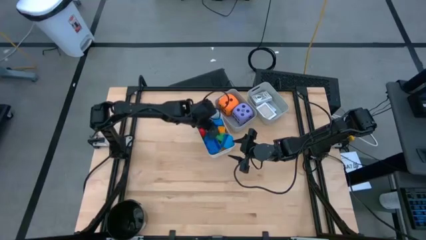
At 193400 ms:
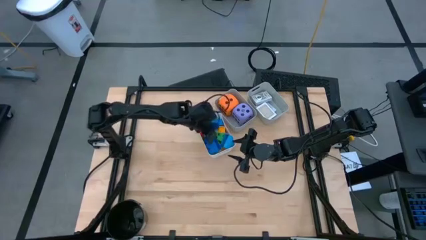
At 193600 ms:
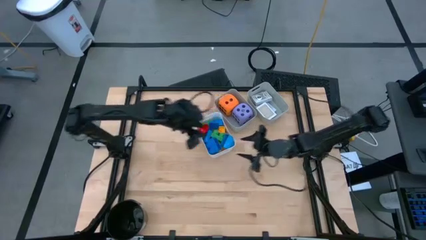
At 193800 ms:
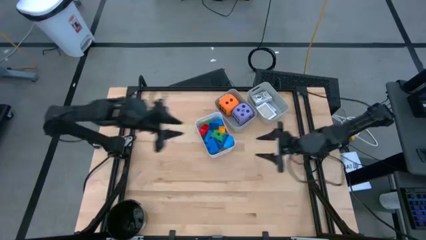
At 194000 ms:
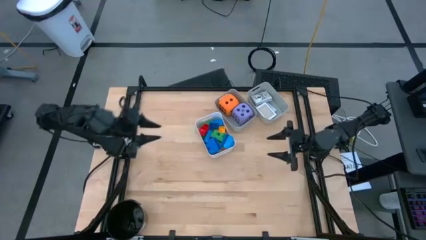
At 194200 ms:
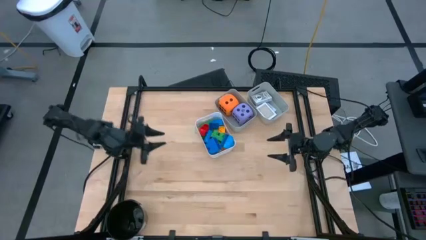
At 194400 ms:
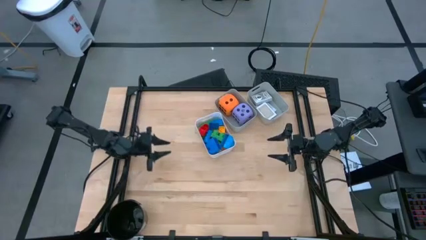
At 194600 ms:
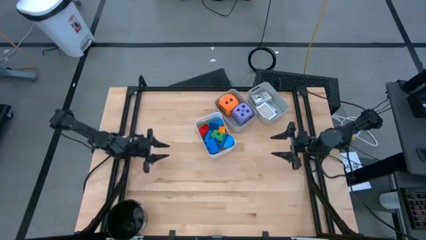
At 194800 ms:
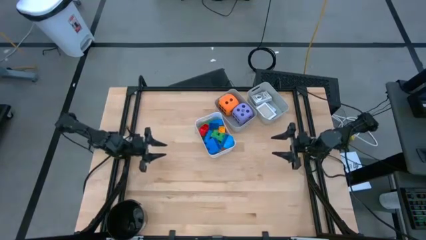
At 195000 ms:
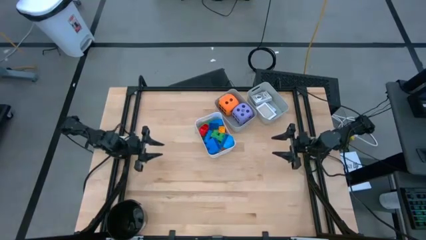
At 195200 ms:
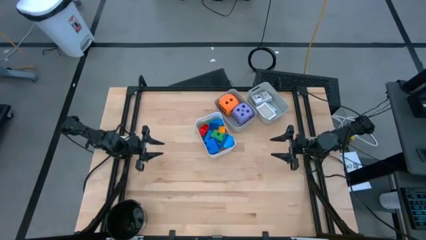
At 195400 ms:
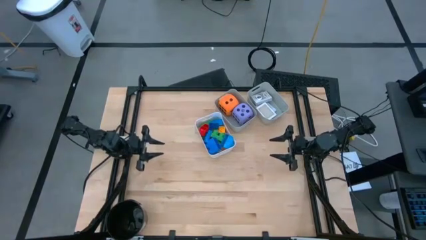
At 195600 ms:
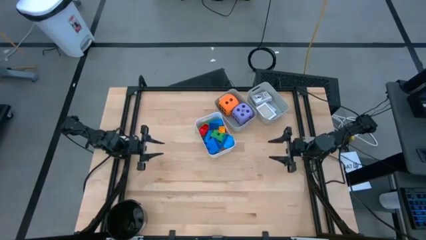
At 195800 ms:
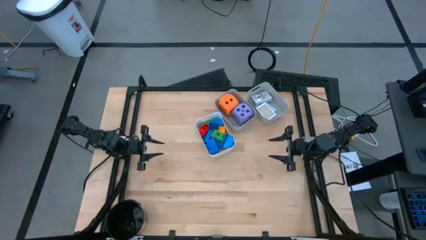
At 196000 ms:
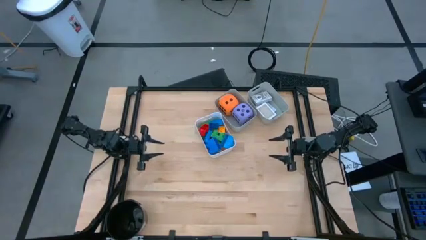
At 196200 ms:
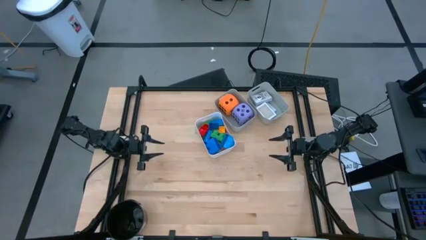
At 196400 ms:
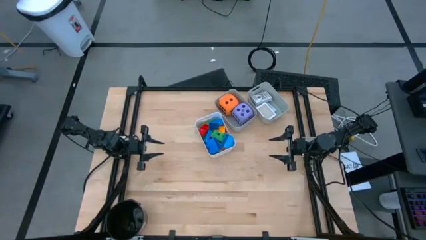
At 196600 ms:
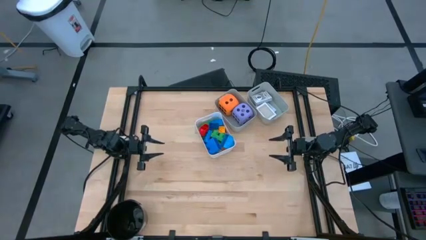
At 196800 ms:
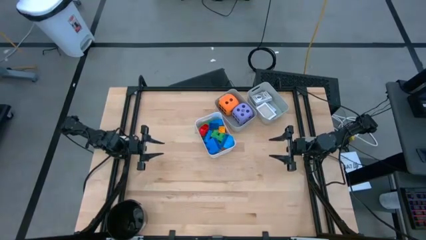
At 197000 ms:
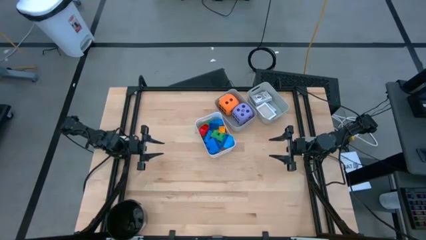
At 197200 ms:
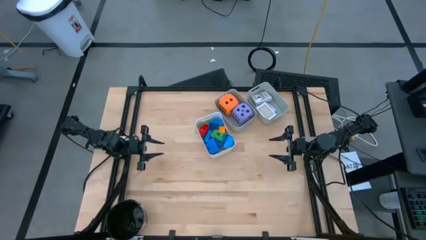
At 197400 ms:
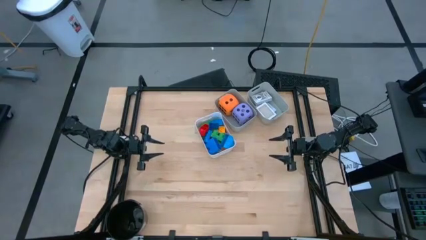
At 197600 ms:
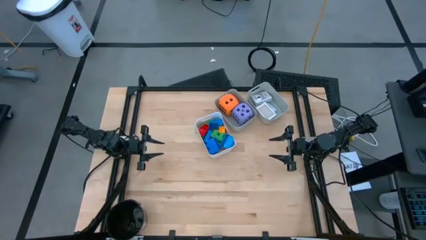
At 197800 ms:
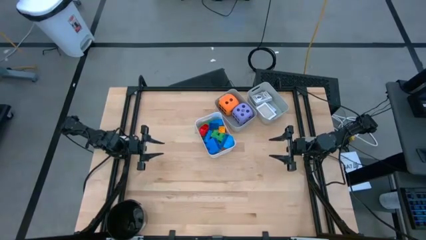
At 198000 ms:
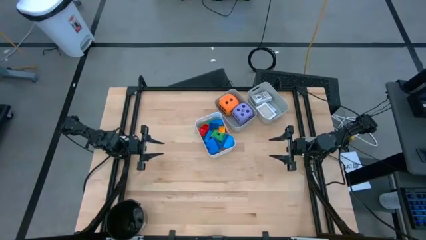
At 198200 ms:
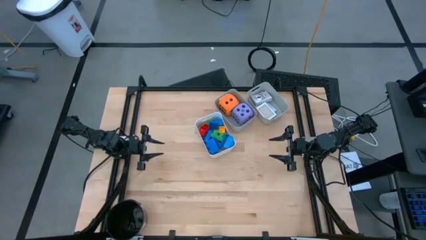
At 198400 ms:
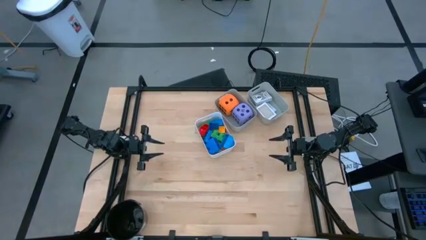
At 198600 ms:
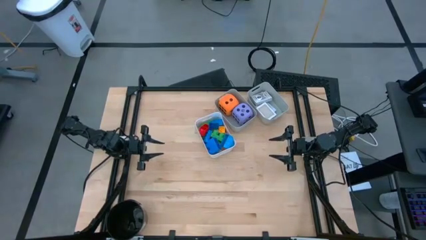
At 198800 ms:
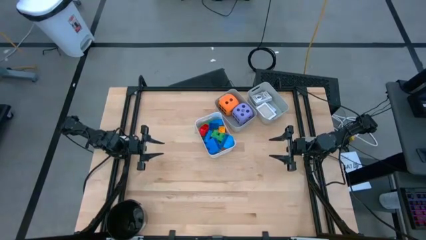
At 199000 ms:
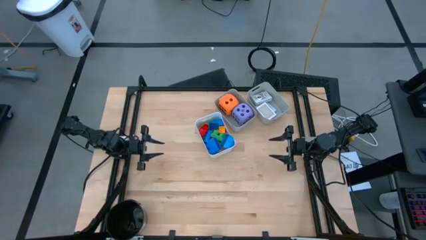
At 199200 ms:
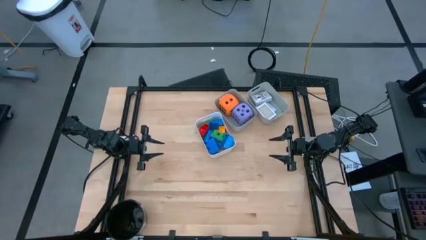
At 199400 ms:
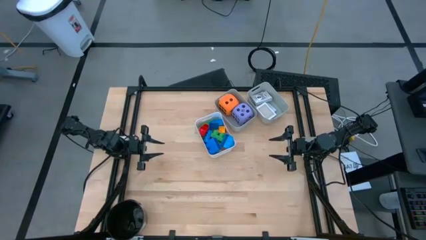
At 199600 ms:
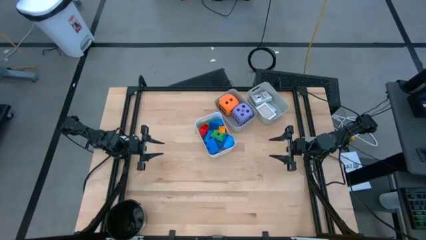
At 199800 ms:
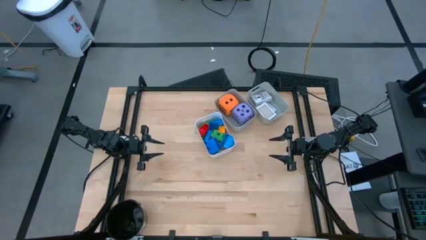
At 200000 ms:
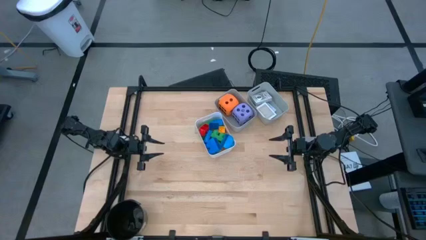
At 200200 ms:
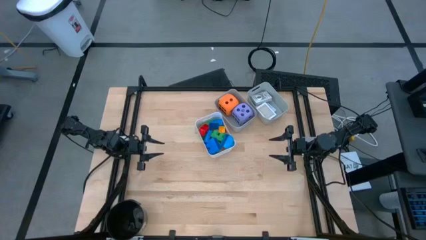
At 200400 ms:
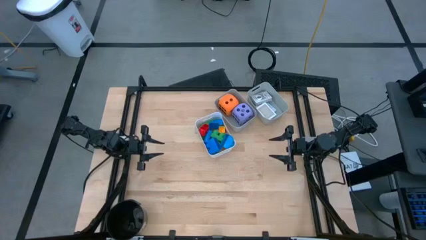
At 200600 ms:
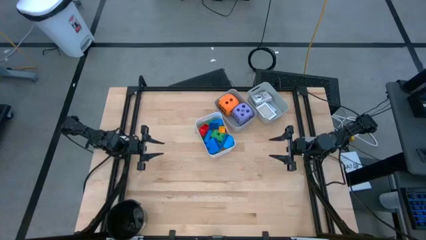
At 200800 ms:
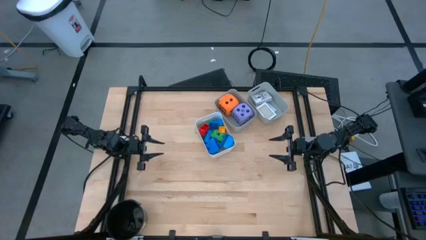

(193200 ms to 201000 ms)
Task: Pick & Place Toys
Return to Home Position

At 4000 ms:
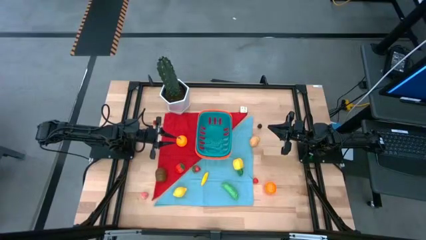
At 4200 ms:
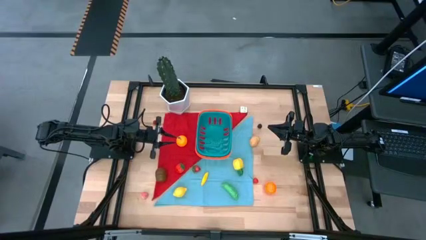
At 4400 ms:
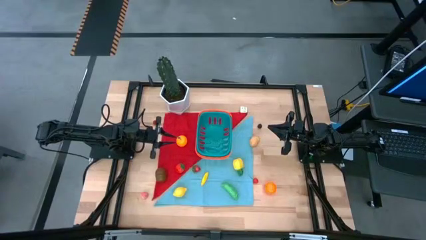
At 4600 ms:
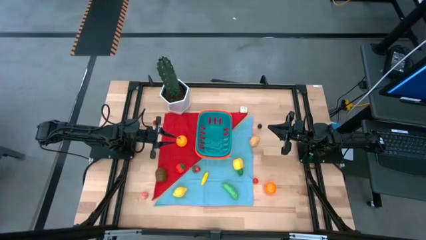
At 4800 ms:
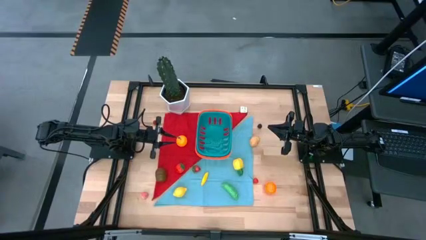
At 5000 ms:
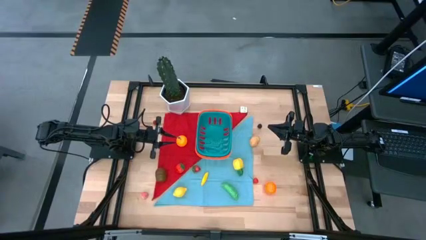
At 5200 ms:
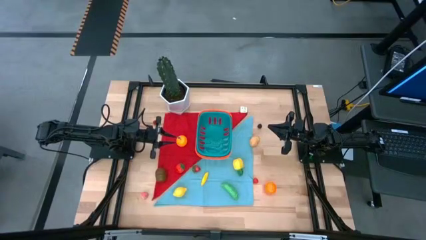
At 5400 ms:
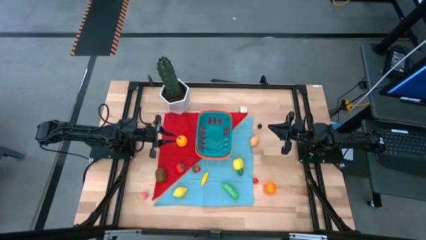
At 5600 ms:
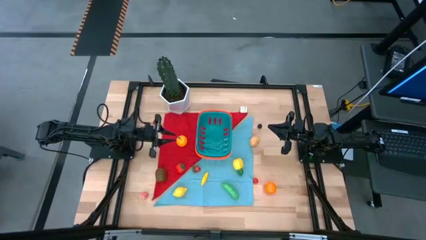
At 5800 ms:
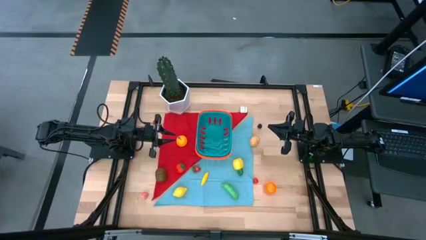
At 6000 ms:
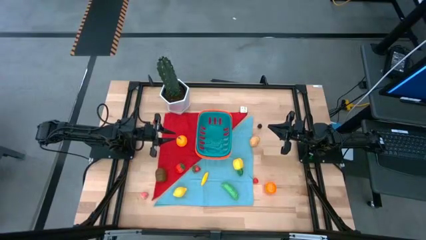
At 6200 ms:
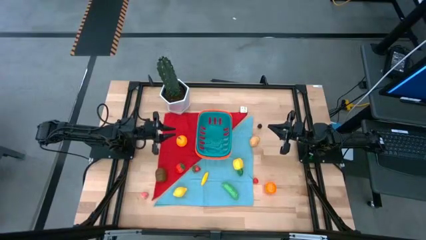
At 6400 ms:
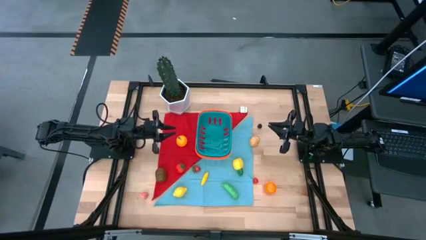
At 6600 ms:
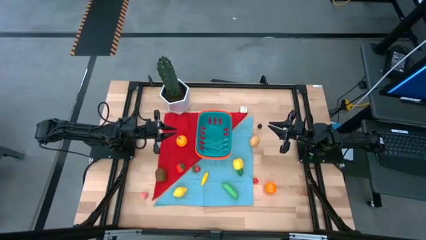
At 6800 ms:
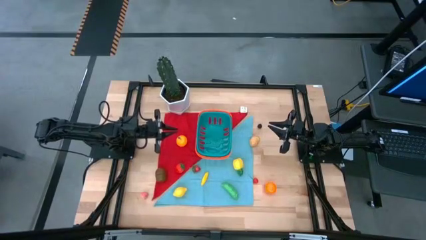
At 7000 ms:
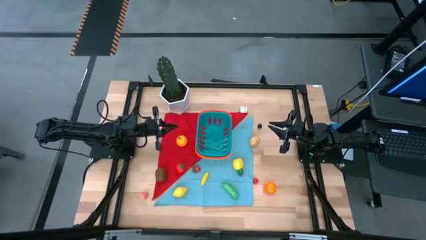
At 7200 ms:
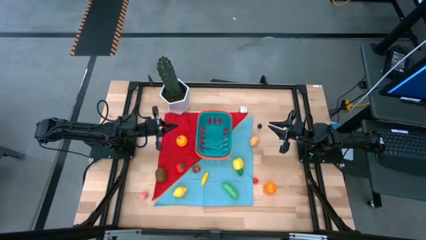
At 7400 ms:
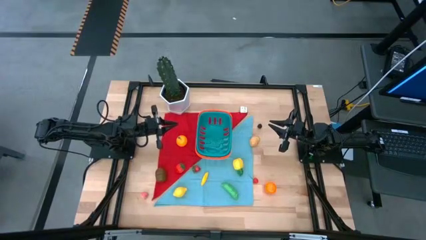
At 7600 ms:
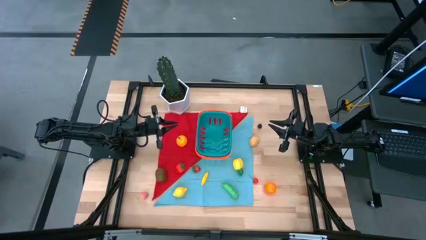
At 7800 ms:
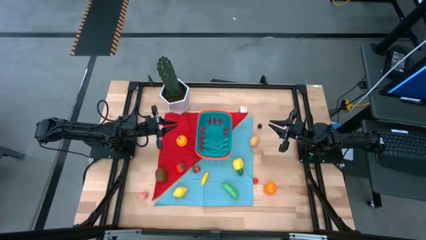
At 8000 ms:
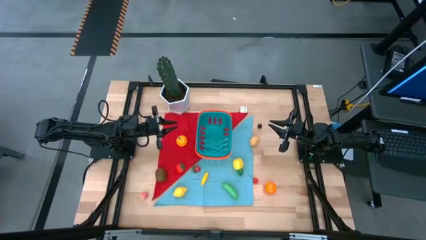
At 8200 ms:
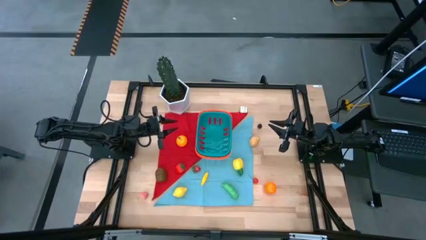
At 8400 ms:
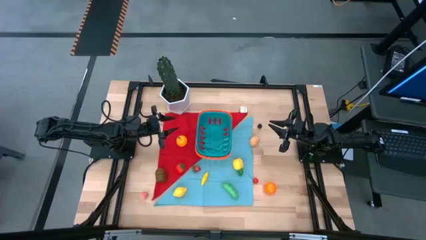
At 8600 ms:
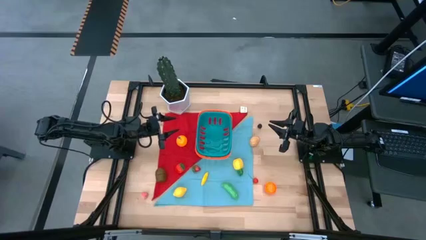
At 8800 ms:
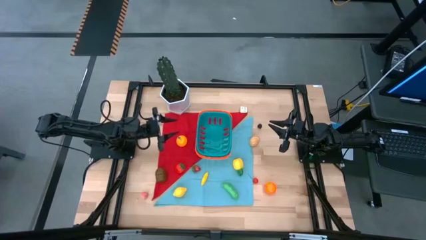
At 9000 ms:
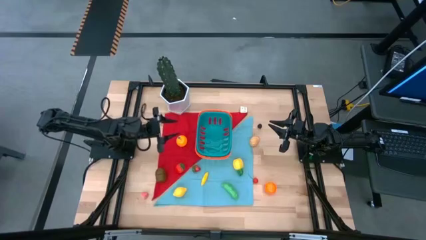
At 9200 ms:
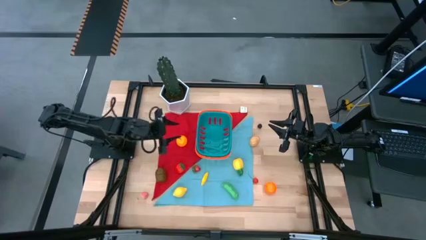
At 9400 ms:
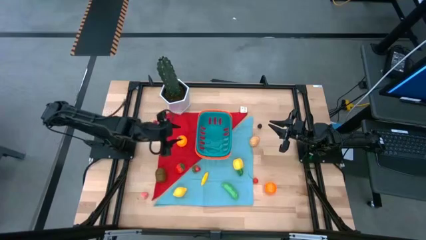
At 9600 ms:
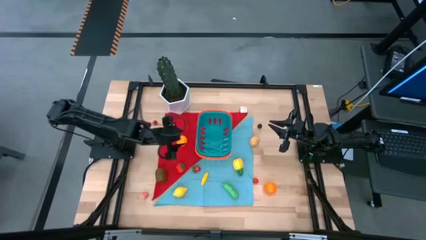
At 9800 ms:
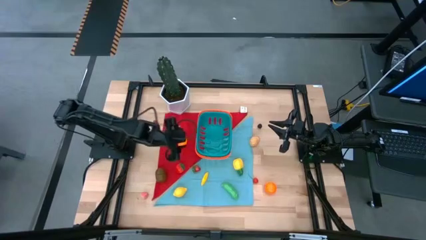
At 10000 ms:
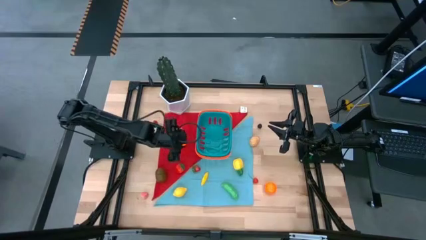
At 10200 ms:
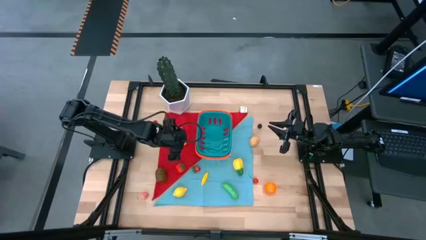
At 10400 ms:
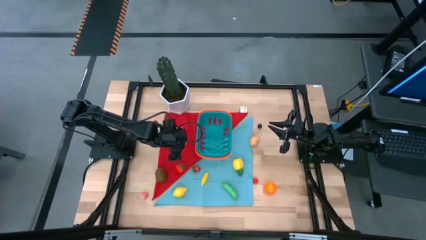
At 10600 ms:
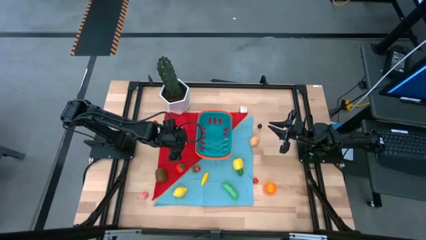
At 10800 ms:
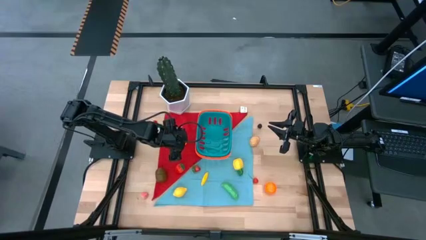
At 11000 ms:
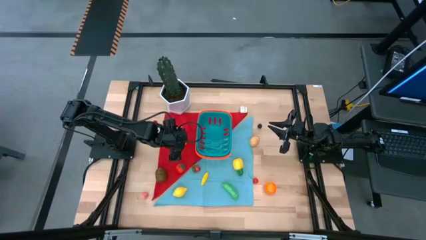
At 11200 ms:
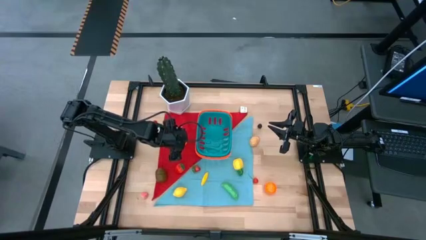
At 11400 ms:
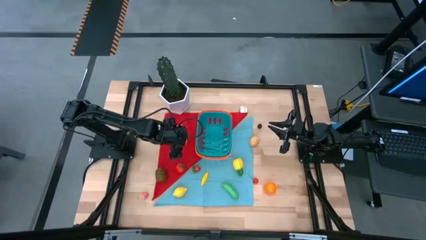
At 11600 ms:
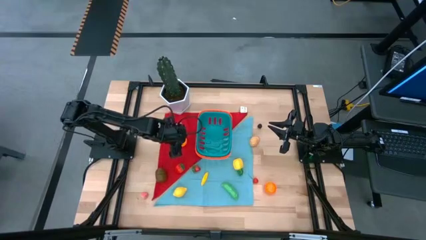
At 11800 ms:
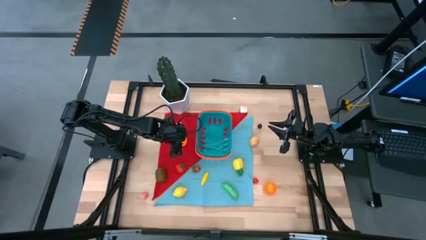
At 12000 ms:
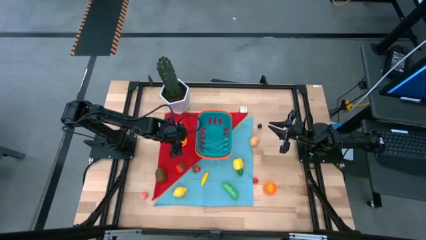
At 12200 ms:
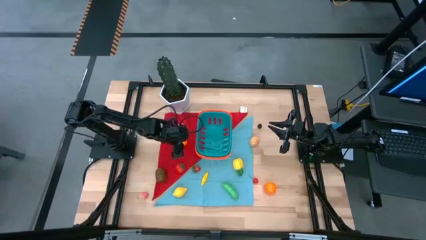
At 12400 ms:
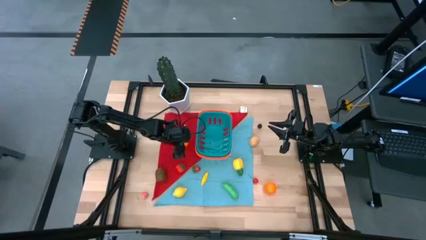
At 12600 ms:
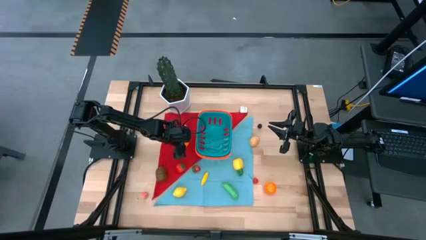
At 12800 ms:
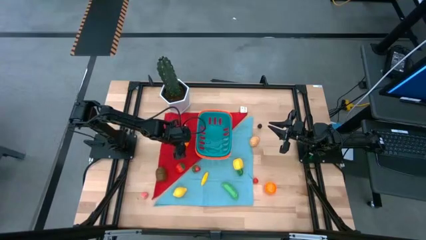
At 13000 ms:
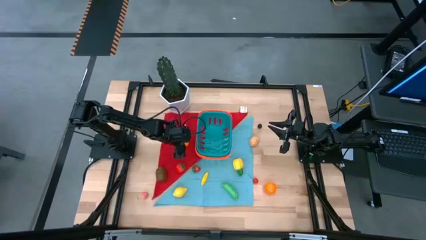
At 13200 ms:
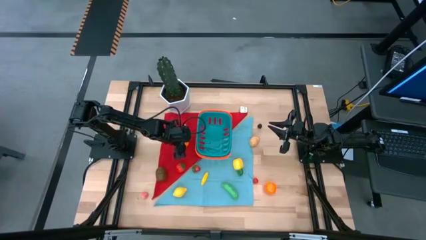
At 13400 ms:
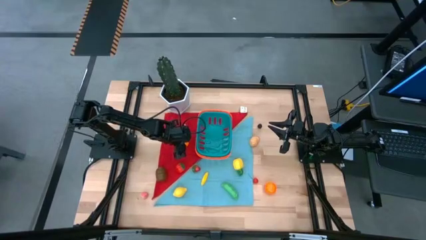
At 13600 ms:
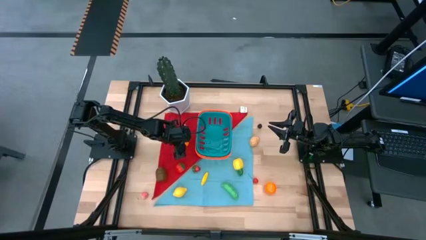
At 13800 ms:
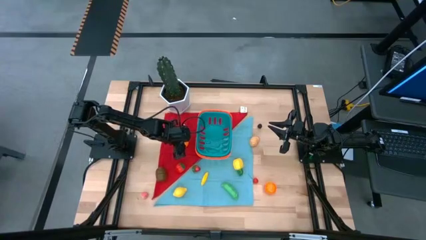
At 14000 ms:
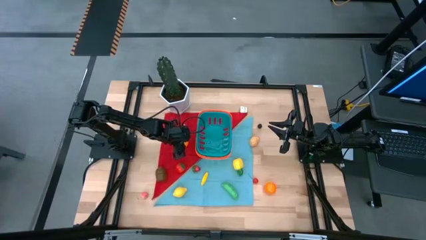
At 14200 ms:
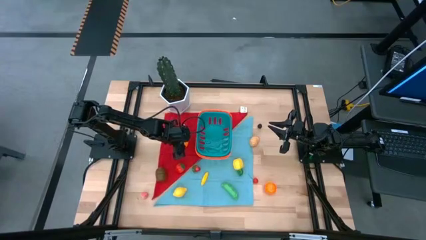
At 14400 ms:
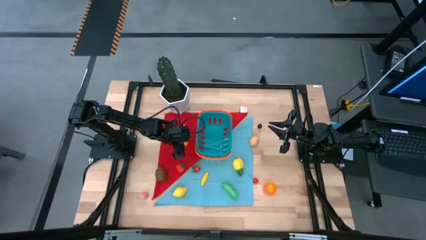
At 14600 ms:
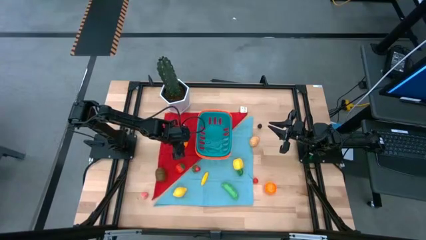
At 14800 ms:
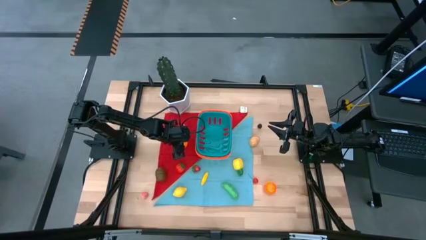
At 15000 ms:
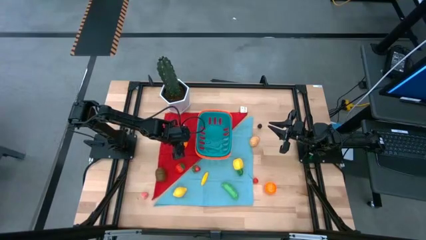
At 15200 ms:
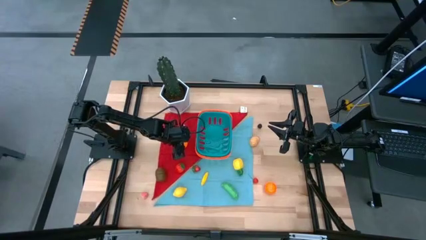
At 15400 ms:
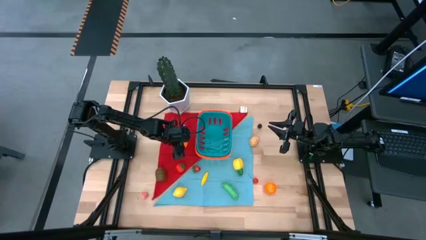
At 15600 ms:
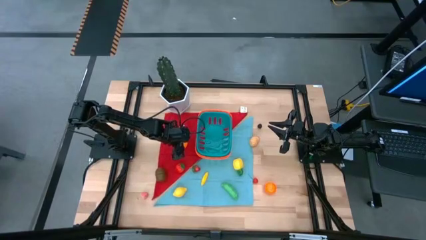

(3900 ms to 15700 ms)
Task: Pick and placing Produce into tupperware
Put the orange into the basket
